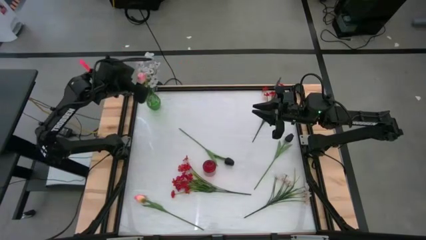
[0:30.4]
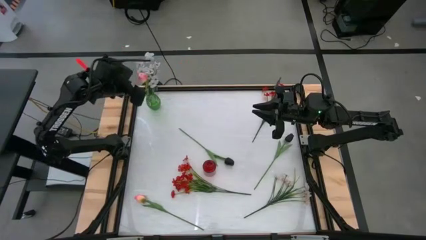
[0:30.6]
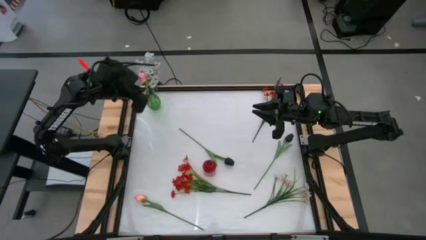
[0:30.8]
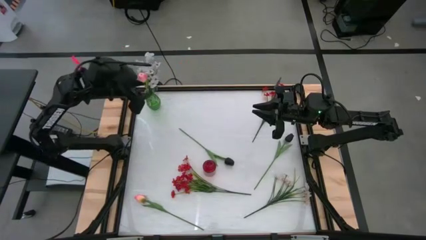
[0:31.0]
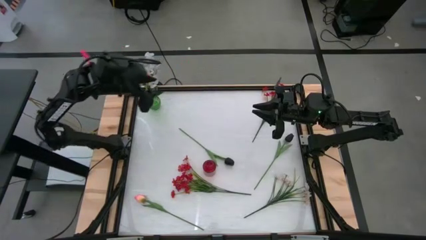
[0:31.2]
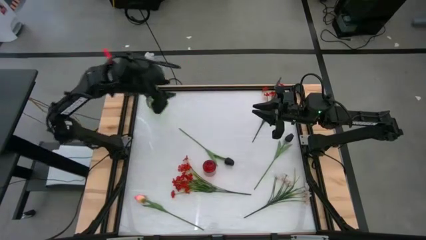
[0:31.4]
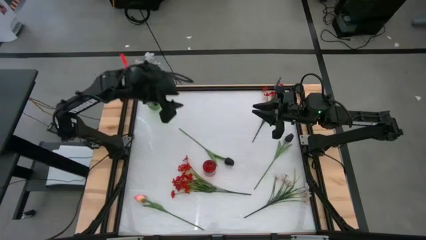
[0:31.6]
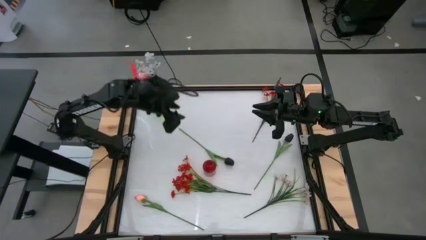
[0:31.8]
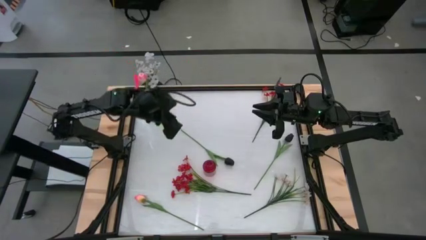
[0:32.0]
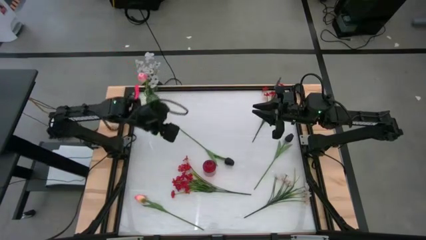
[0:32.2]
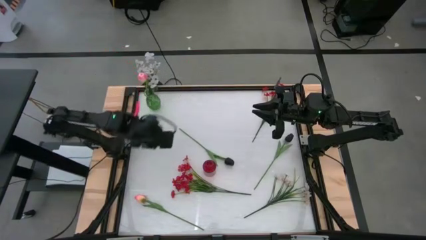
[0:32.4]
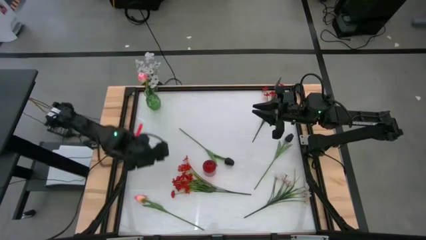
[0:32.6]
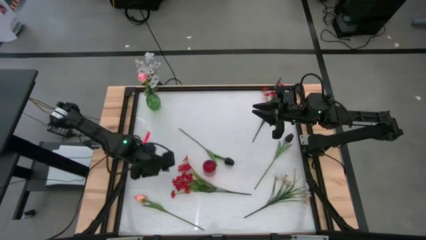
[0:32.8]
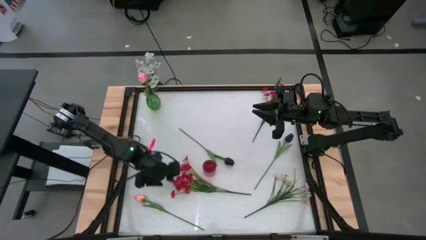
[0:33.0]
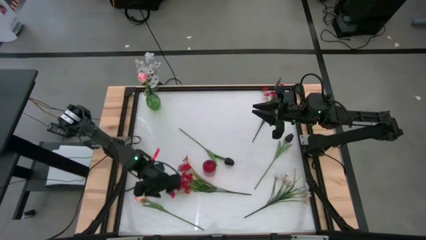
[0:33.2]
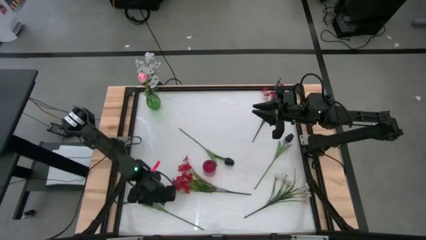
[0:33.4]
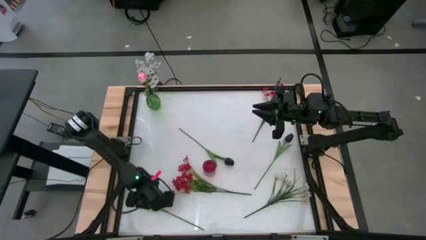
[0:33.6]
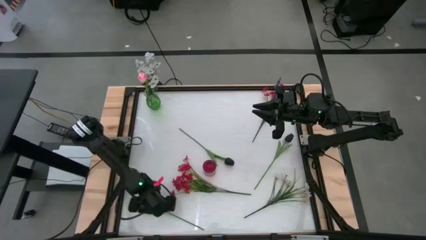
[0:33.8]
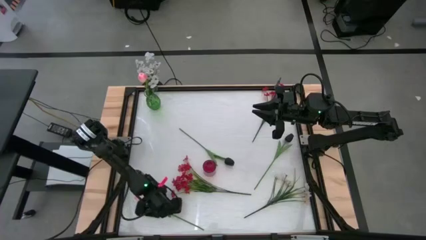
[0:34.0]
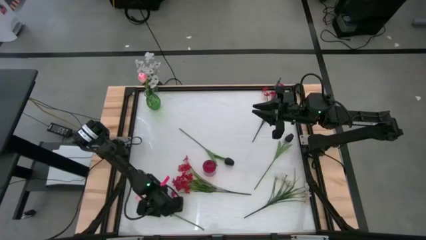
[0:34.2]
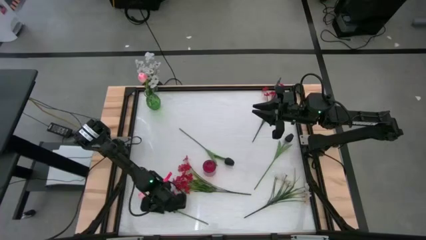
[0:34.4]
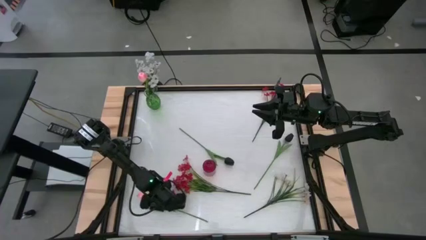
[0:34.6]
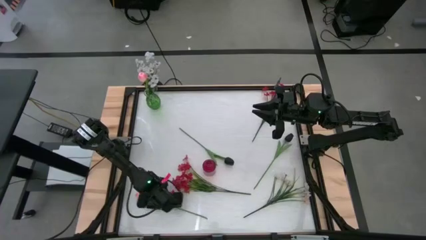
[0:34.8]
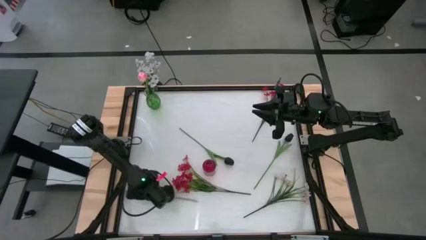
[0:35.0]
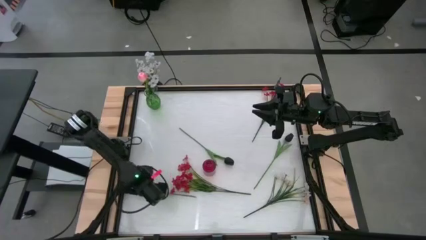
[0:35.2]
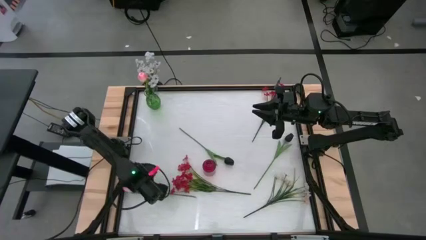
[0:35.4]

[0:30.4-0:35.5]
Task: Sort flowers into vase by color
Put the pink flowers into the green flower vase

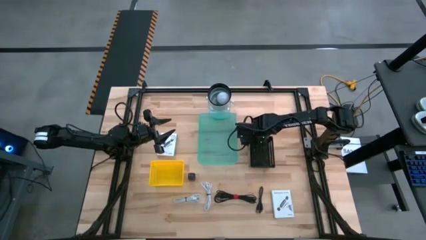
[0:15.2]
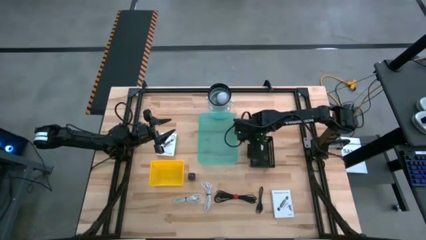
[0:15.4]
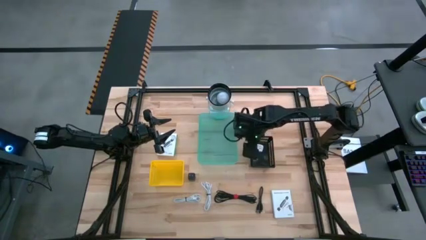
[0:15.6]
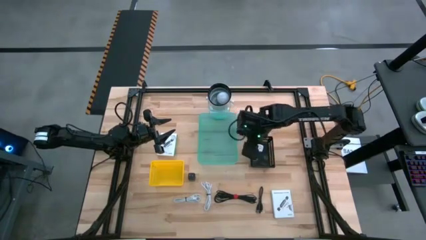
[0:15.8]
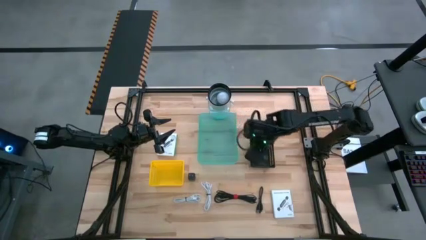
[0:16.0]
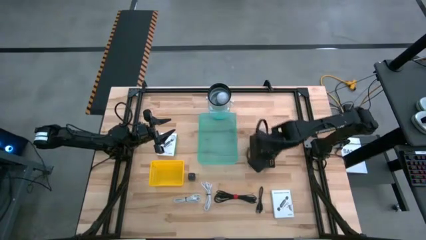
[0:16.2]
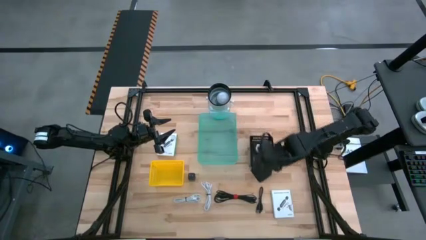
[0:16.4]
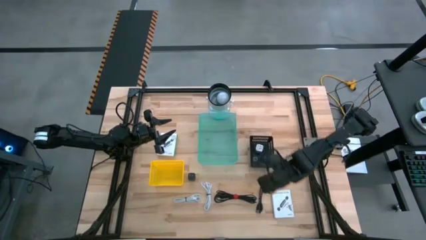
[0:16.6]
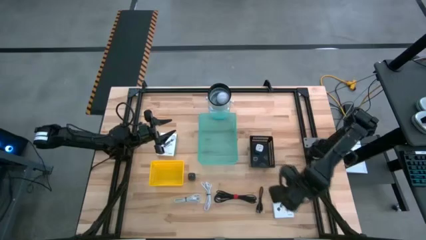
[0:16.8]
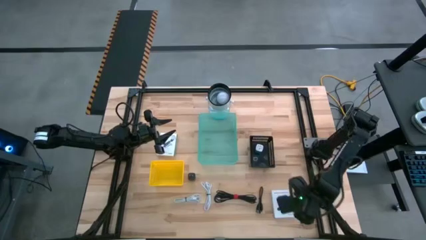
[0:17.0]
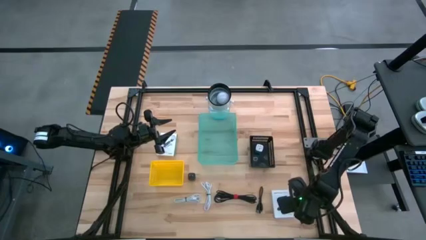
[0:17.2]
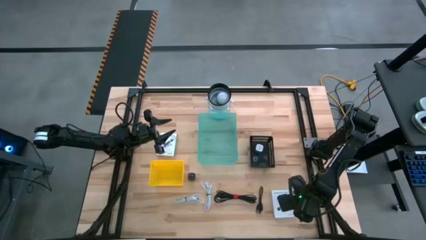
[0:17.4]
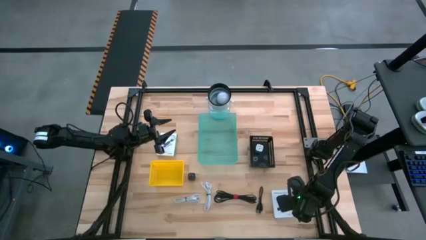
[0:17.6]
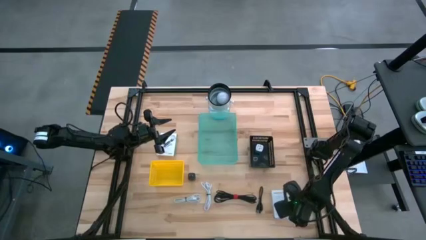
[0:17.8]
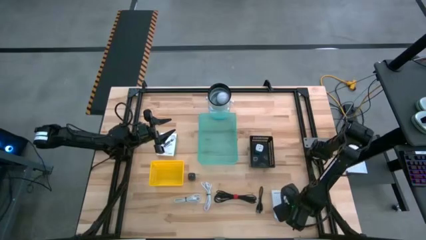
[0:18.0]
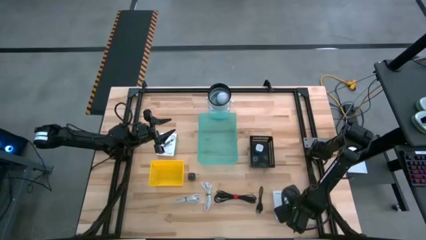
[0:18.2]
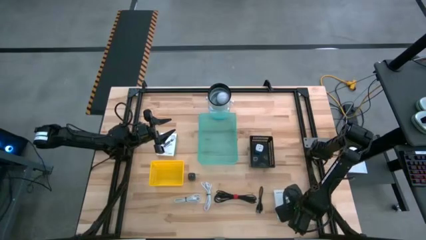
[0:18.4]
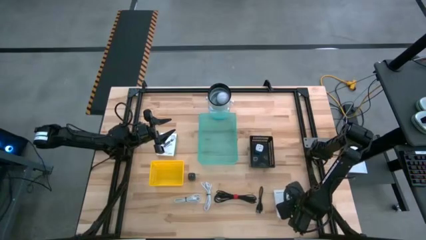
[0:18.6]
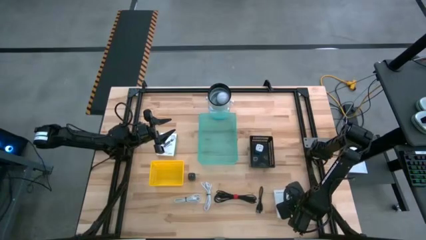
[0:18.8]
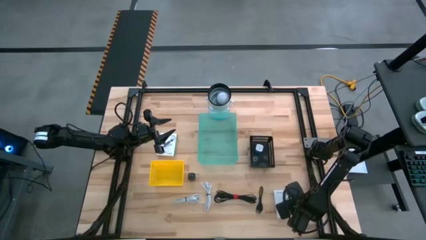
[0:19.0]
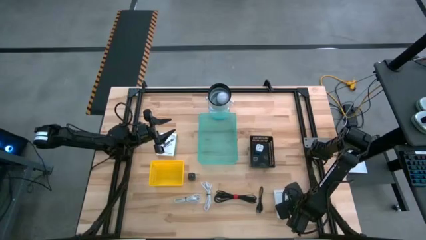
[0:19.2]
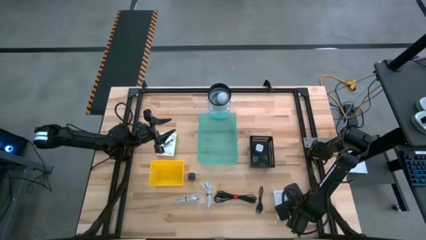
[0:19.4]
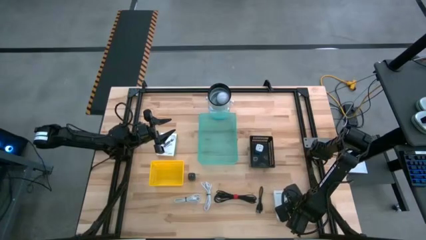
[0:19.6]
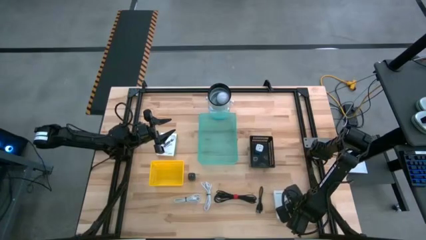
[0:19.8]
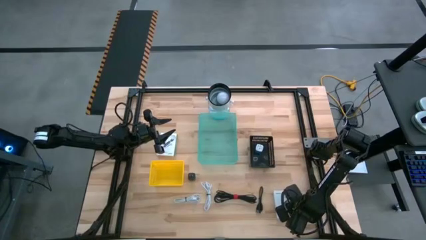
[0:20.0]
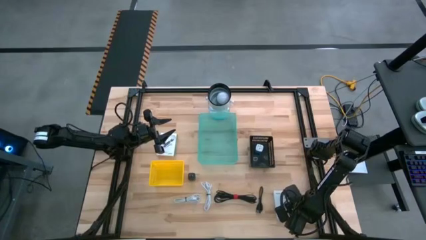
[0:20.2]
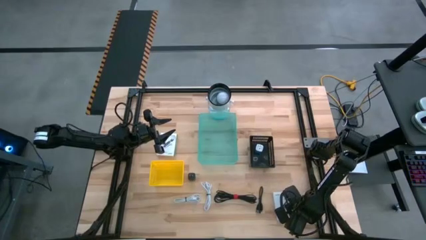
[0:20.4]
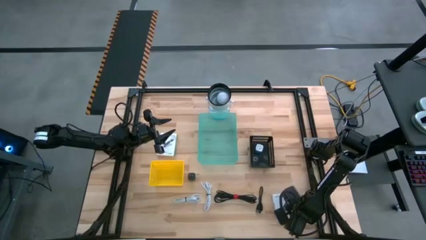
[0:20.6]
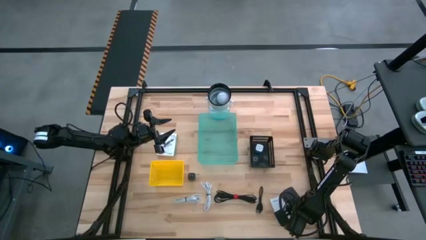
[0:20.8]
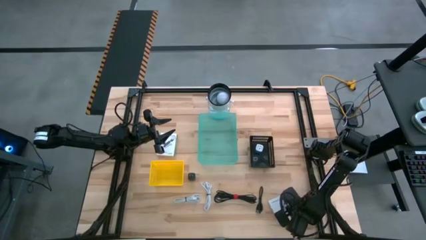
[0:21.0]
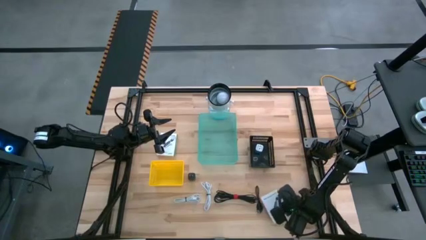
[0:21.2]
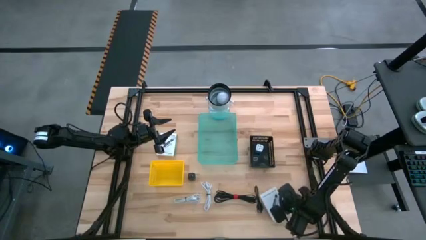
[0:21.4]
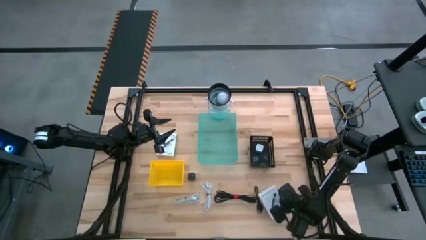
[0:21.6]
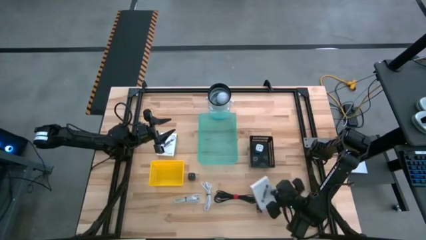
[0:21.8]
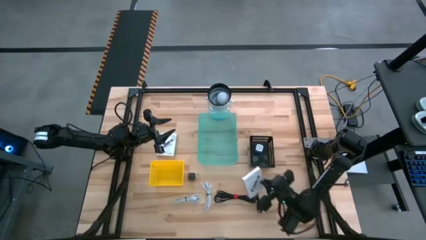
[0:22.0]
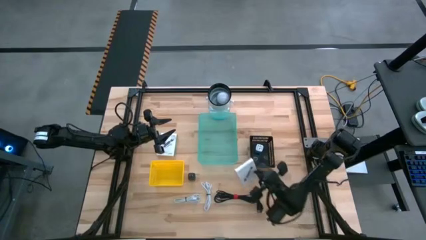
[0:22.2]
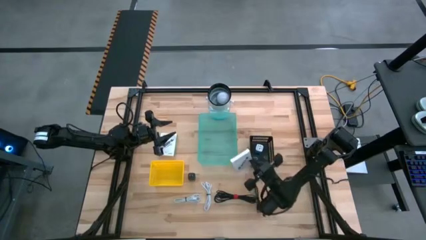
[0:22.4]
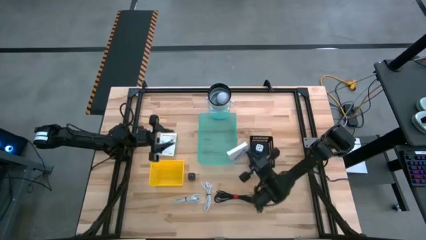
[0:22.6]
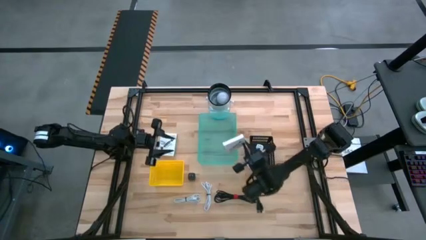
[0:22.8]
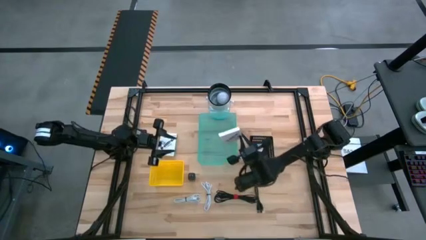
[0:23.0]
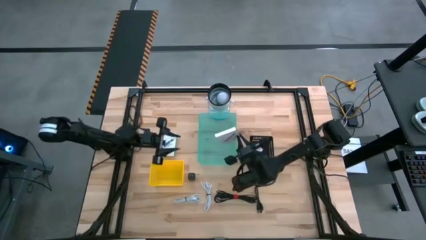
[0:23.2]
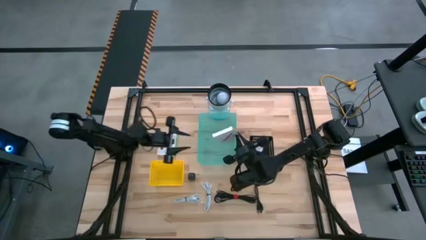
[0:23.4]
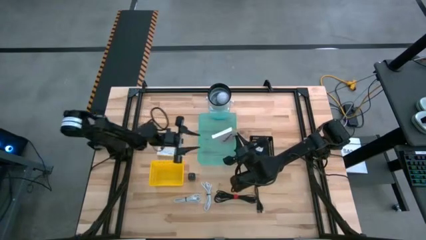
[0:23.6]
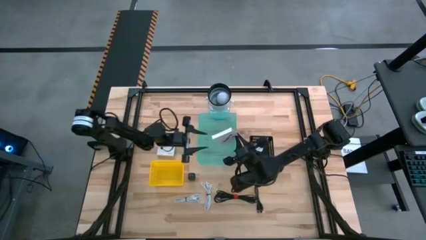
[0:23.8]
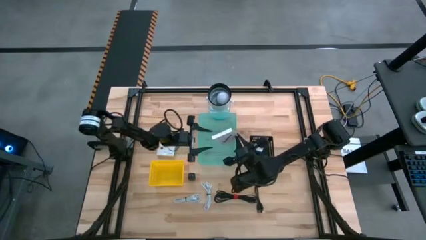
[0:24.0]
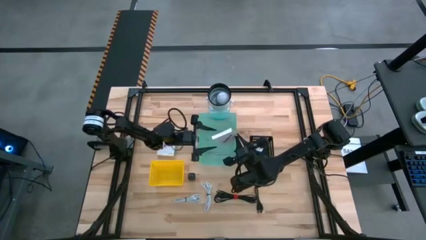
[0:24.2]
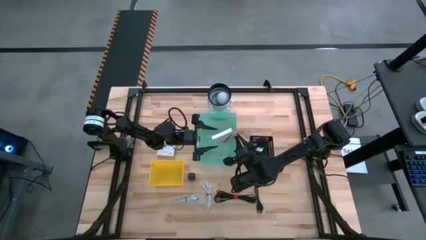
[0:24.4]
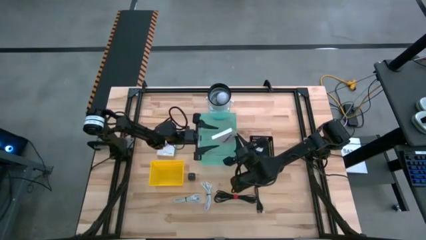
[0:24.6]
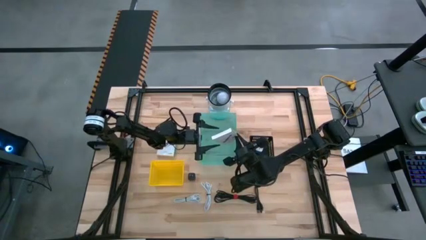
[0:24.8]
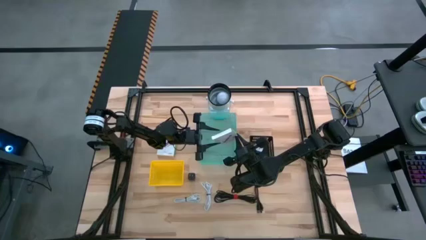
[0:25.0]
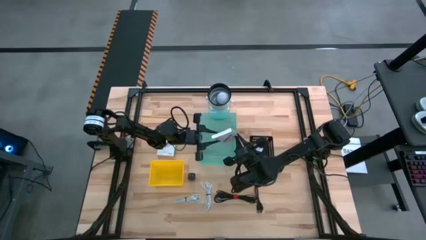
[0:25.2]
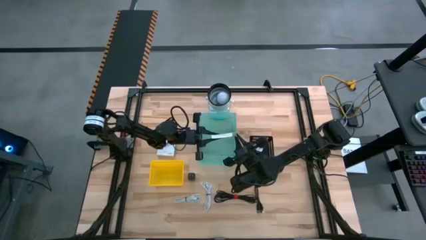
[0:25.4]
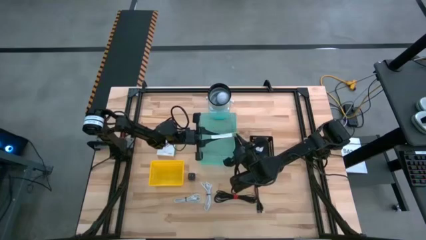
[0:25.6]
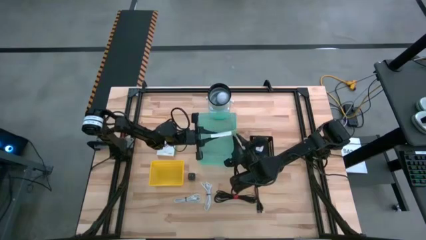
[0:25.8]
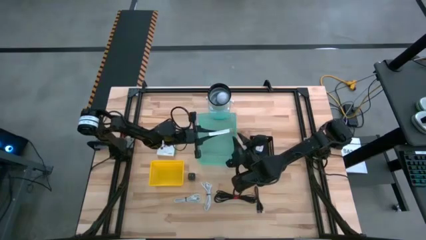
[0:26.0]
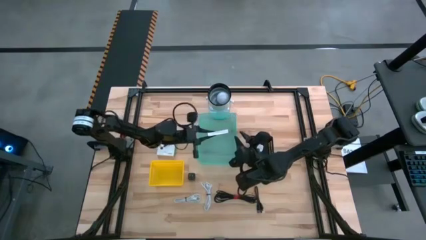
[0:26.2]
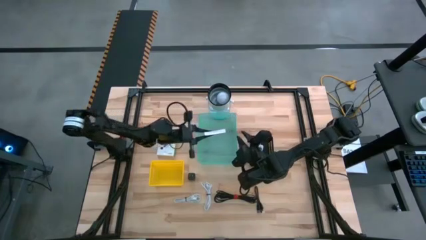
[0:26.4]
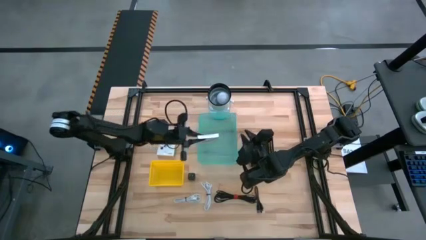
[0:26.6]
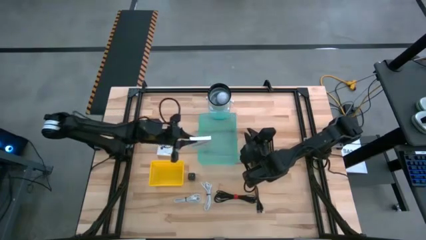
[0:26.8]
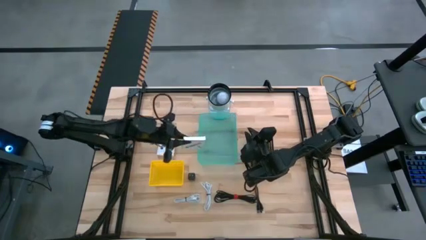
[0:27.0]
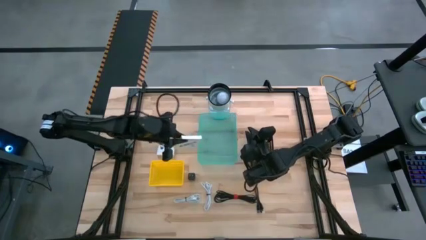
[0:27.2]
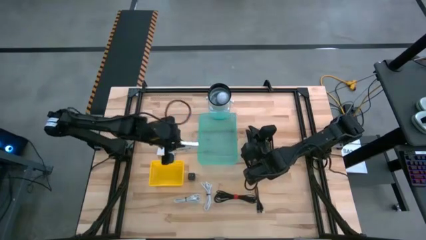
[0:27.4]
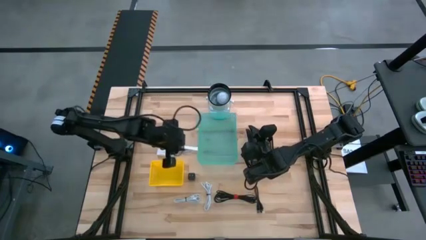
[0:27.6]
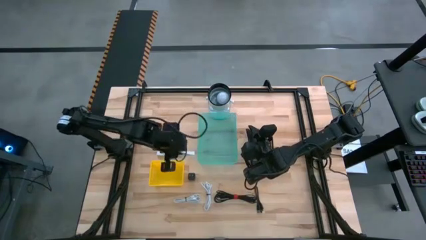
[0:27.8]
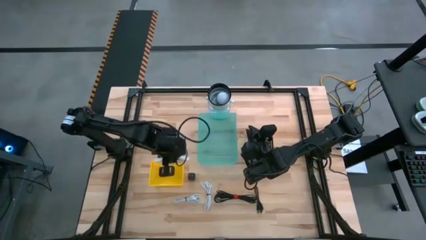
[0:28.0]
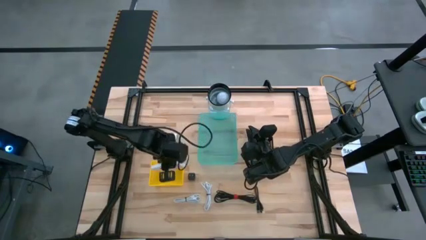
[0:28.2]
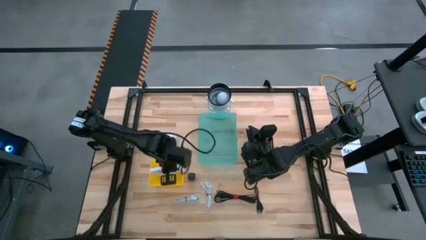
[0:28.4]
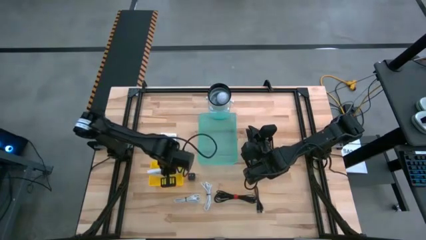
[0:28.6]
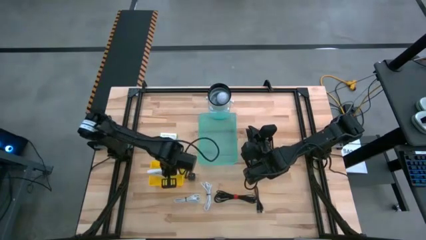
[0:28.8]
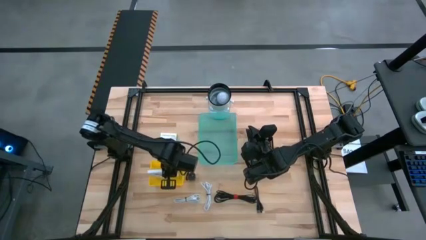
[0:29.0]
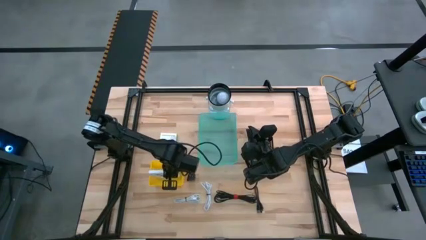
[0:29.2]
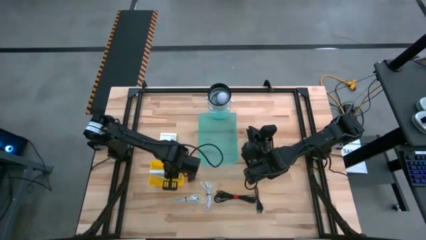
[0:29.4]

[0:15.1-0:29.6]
Task: Pick and place items into bin
Put the right card reader box into the yellow bin
